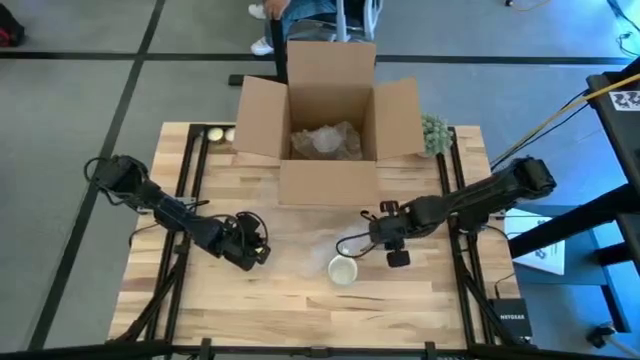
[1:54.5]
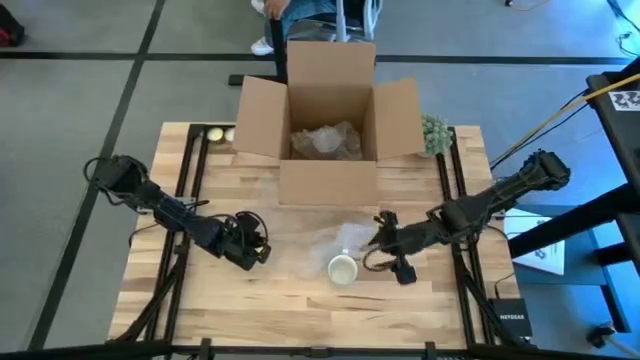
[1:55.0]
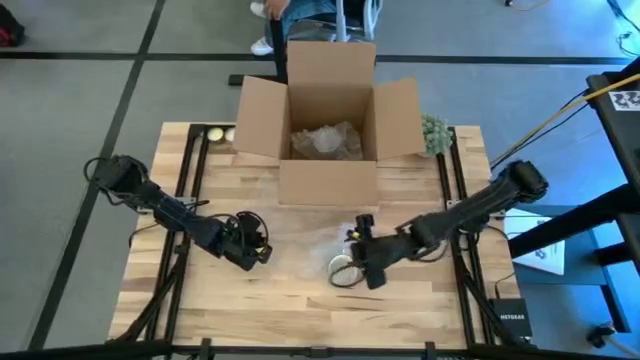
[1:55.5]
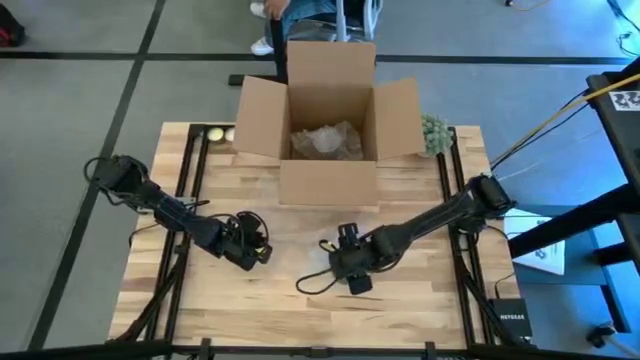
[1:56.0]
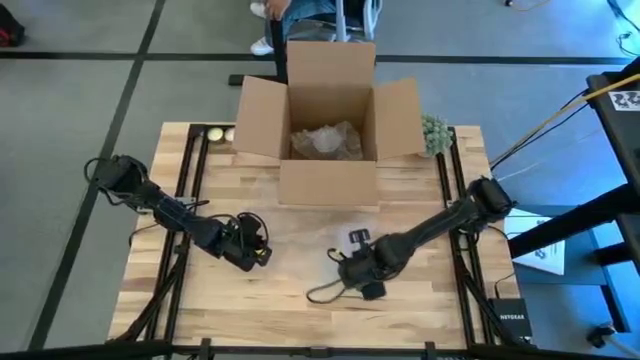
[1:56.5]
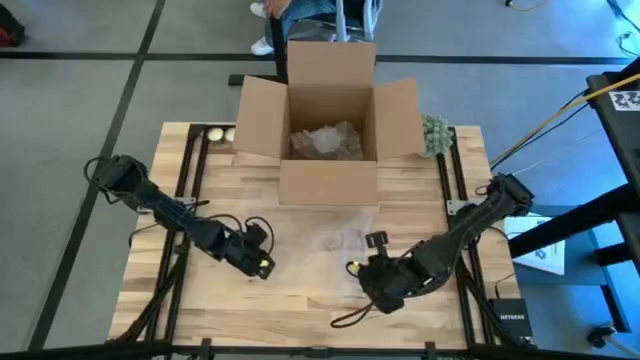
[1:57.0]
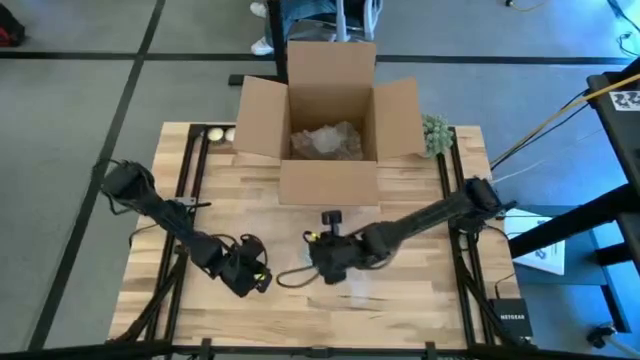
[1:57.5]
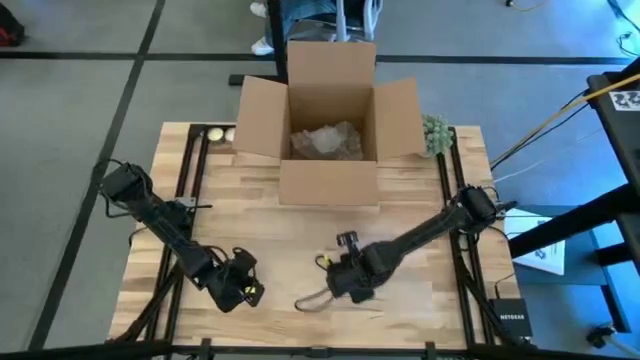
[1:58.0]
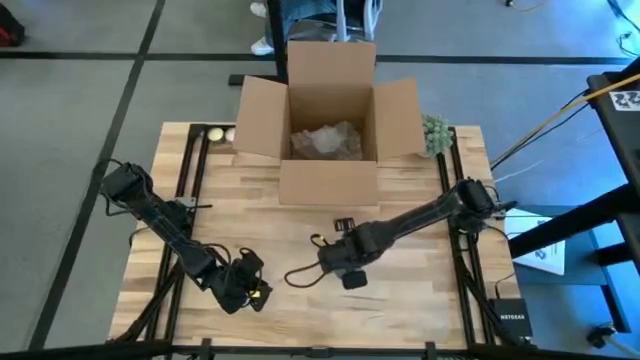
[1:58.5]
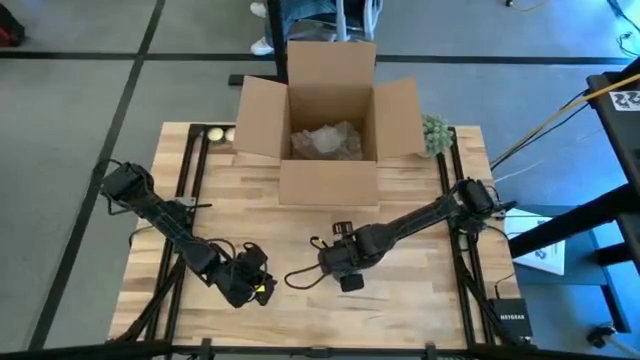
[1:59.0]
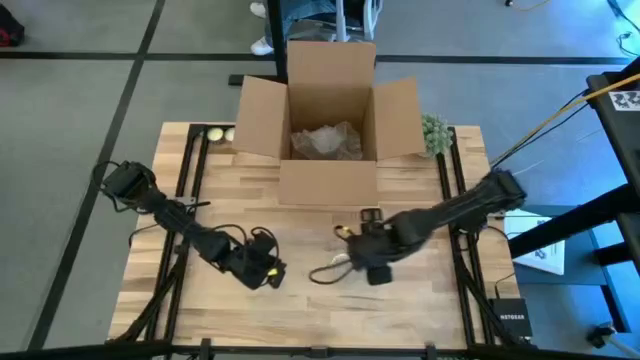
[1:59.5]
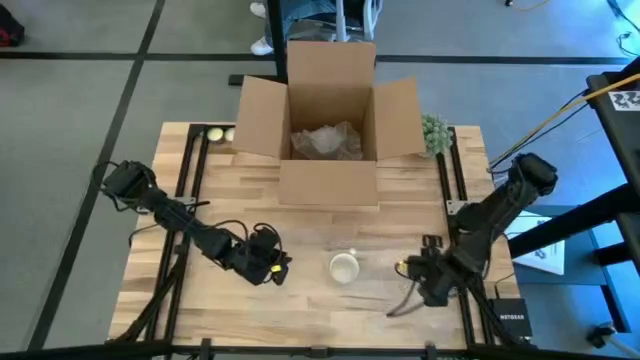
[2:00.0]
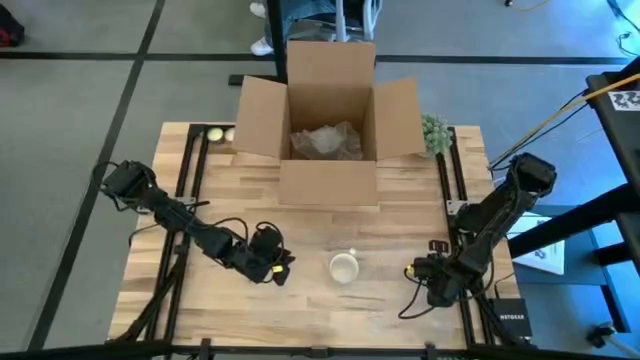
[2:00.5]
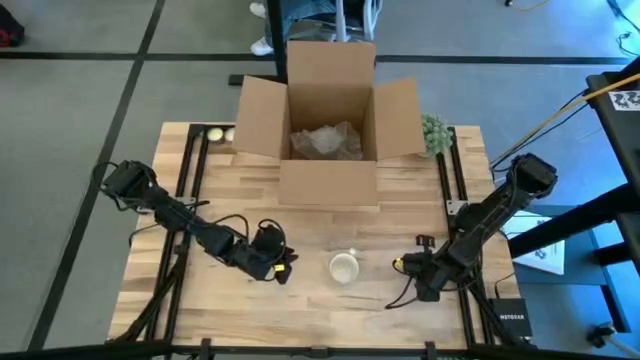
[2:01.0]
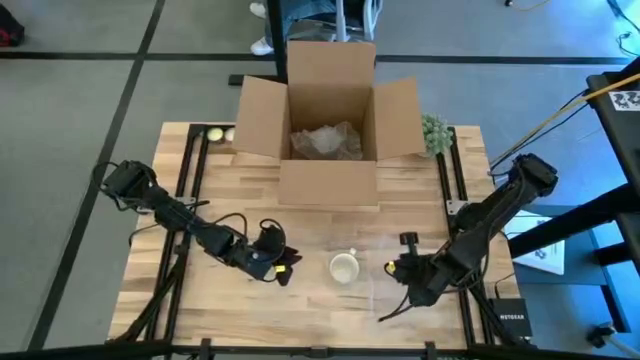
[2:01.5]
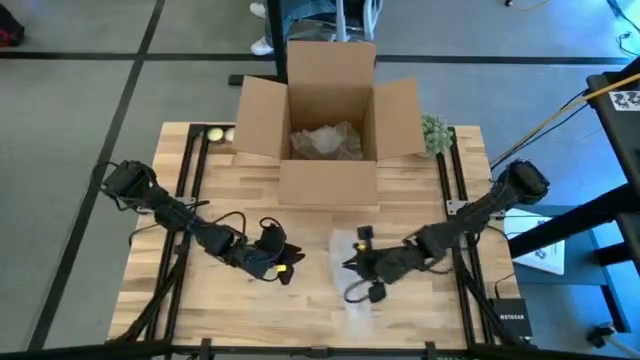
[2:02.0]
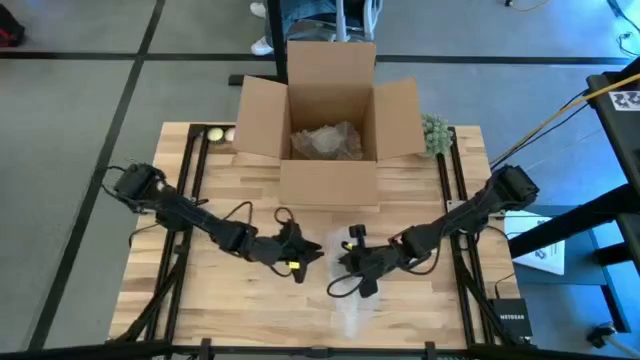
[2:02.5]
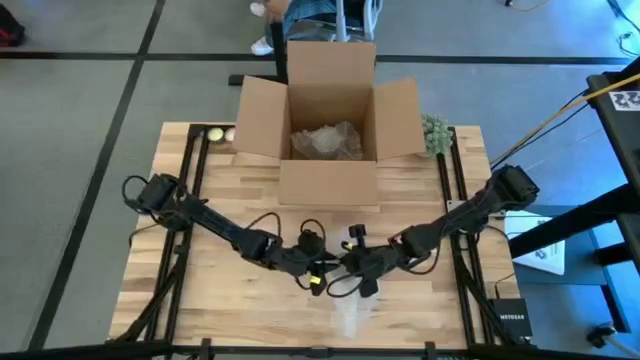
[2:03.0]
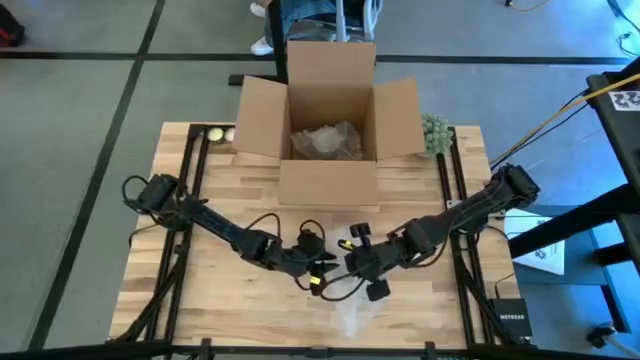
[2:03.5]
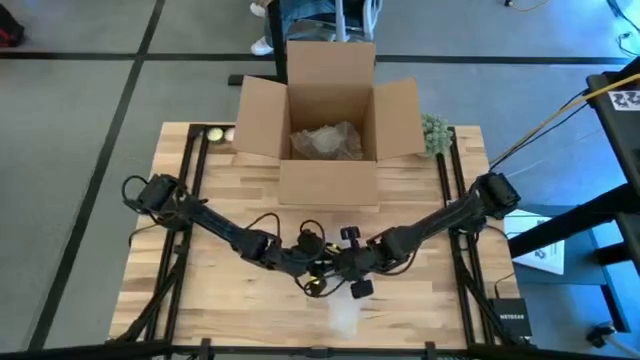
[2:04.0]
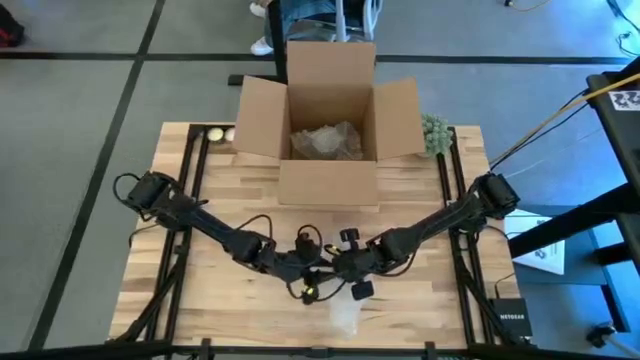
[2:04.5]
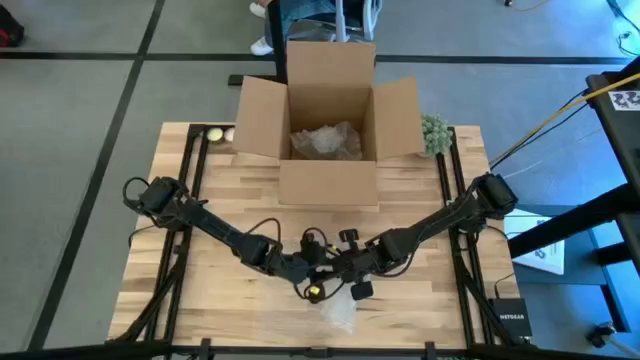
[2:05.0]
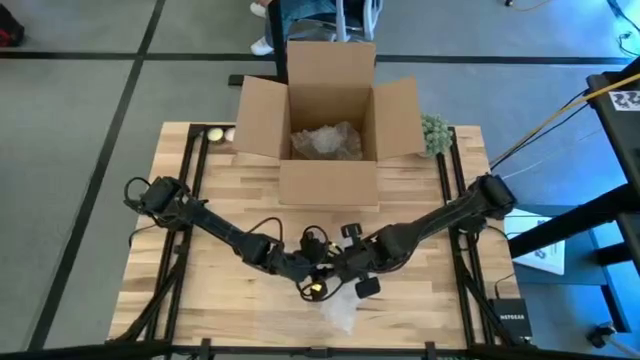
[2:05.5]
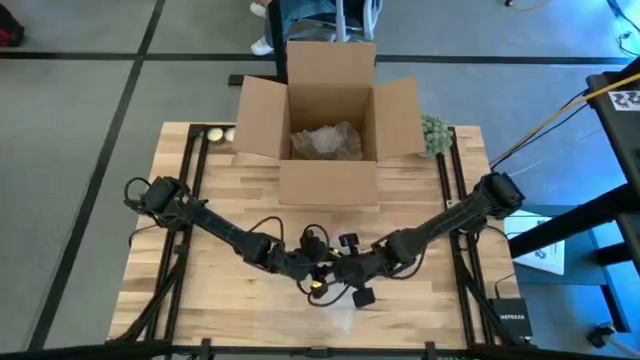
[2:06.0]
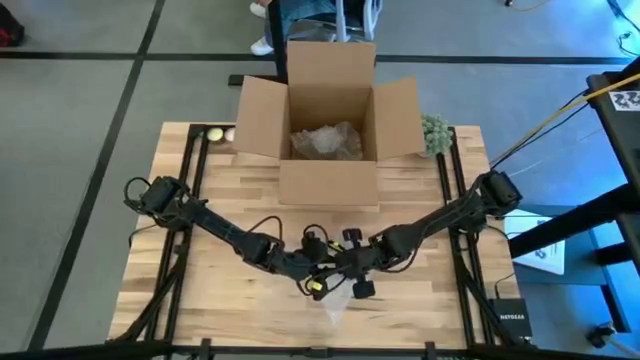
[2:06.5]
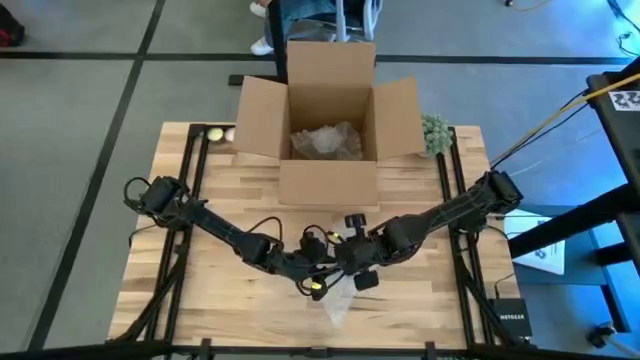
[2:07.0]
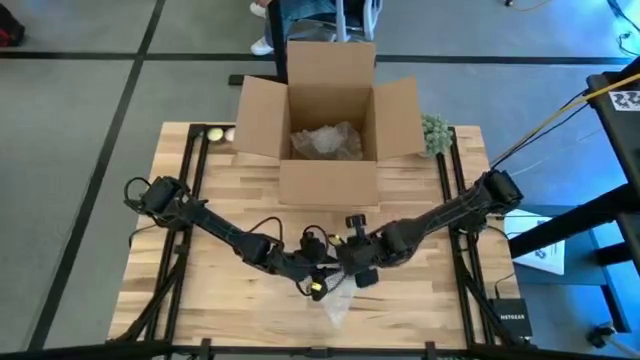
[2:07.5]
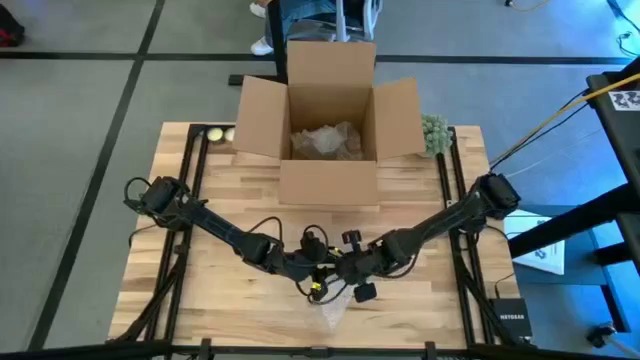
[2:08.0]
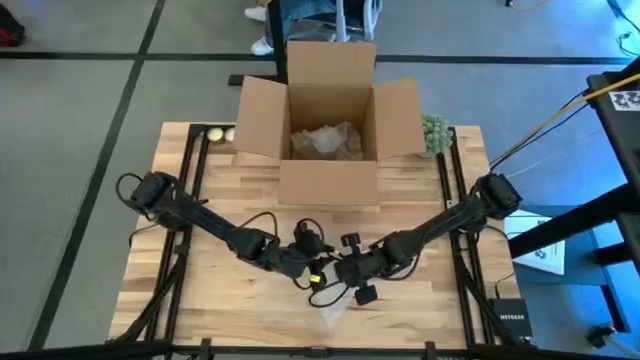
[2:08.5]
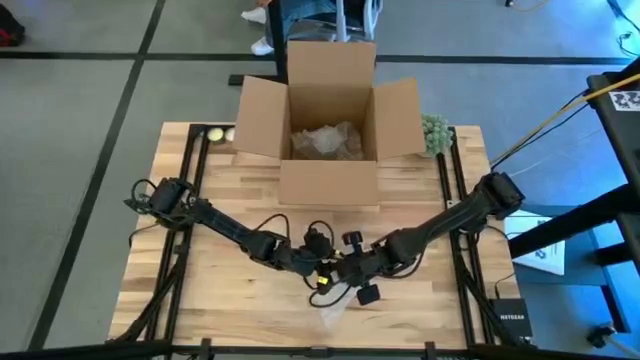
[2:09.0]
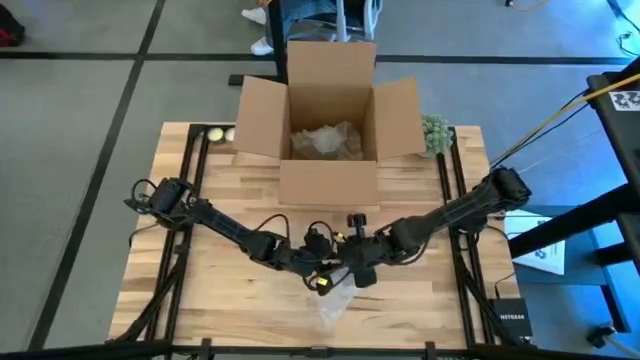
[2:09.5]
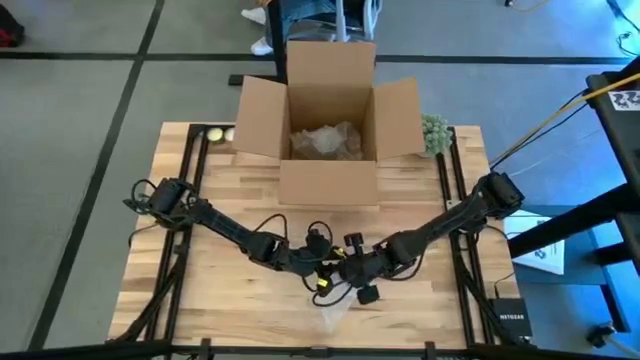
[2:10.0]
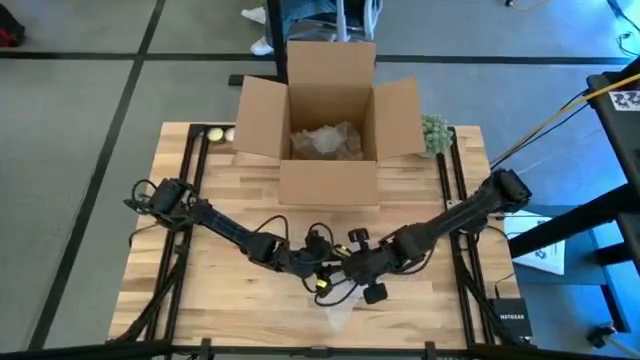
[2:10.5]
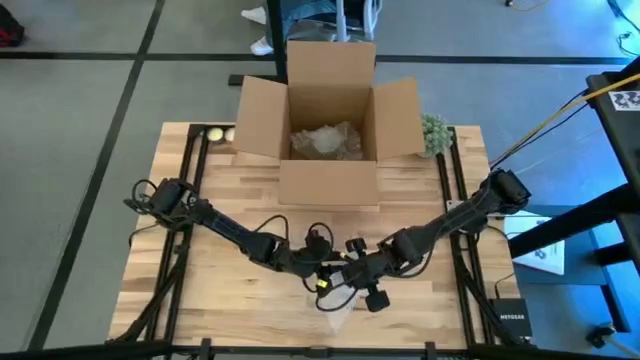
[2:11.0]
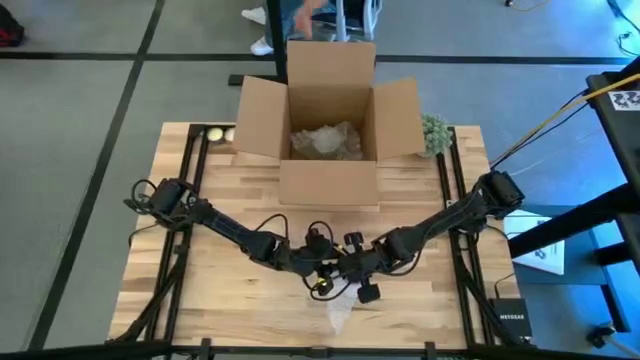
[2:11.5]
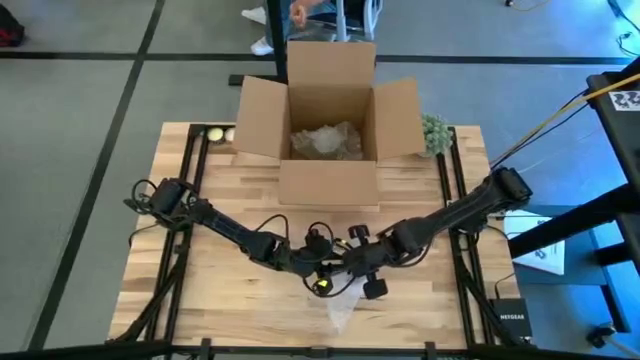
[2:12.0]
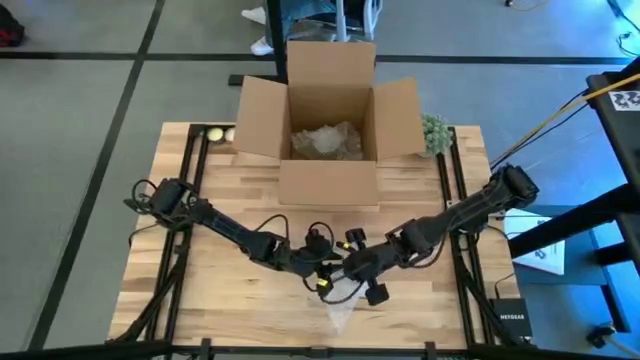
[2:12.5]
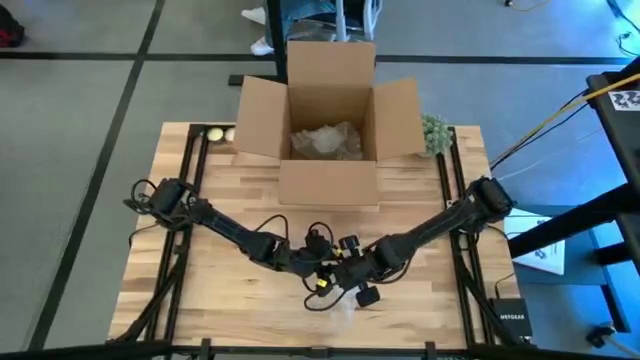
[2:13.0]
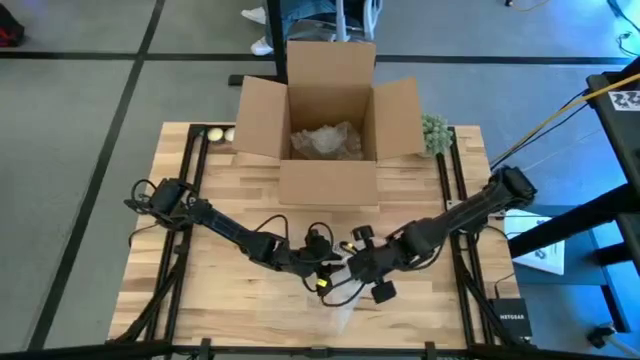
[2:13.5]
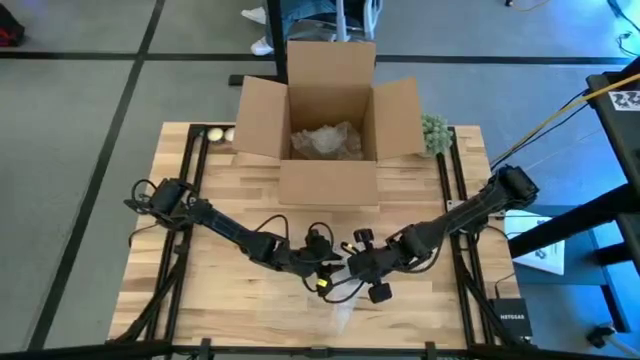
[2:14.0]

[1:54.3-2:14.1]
Task: wrap mug
Wrap the mug with the bubble wrap
